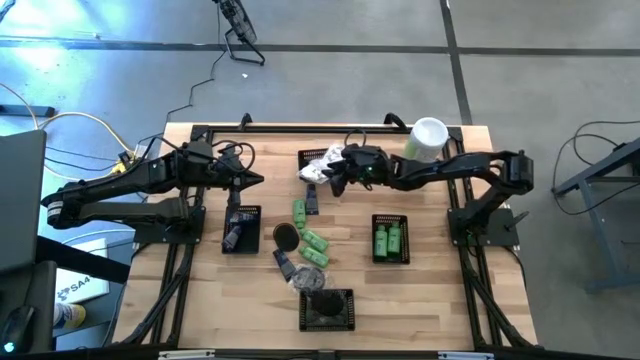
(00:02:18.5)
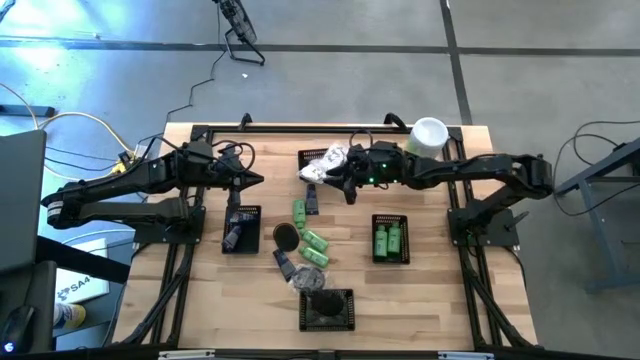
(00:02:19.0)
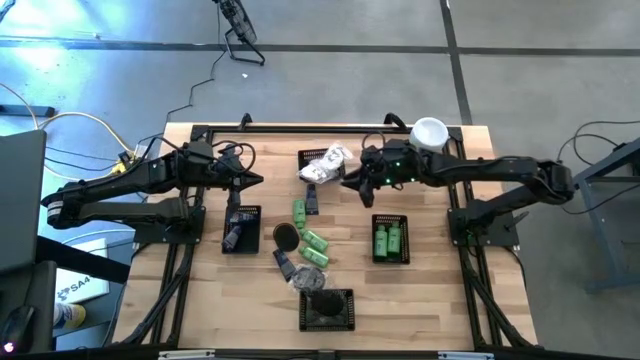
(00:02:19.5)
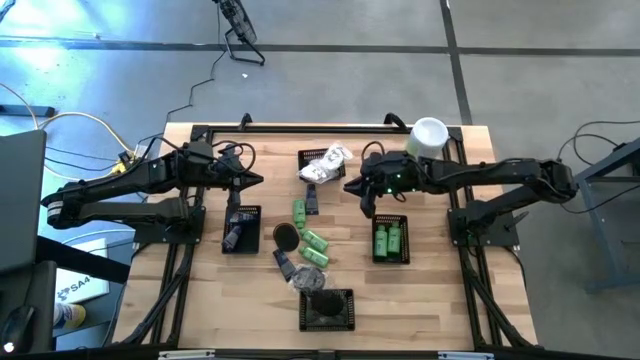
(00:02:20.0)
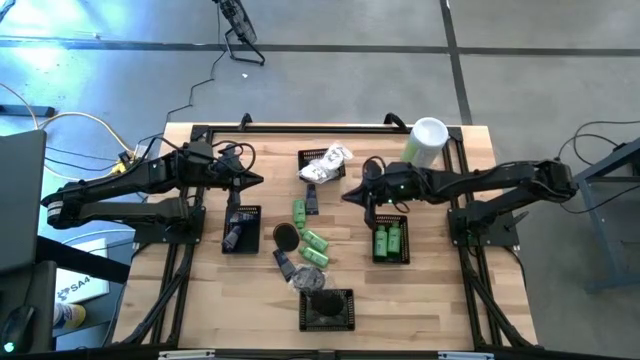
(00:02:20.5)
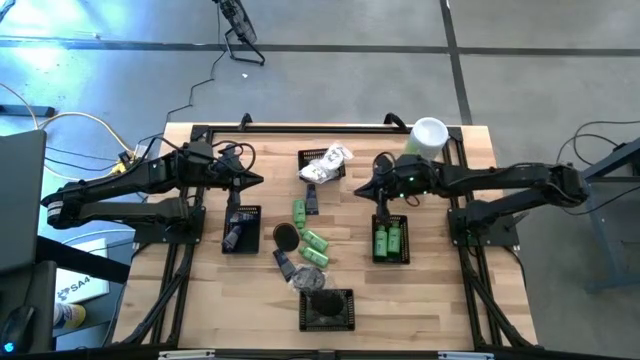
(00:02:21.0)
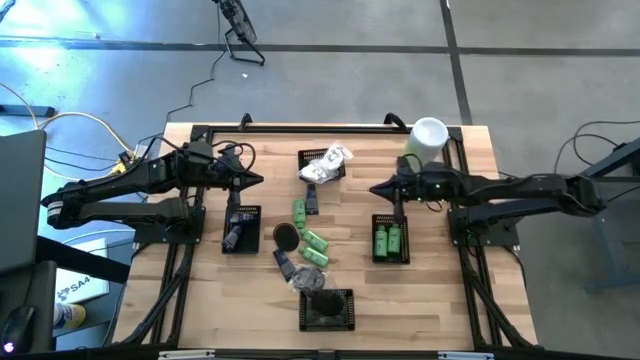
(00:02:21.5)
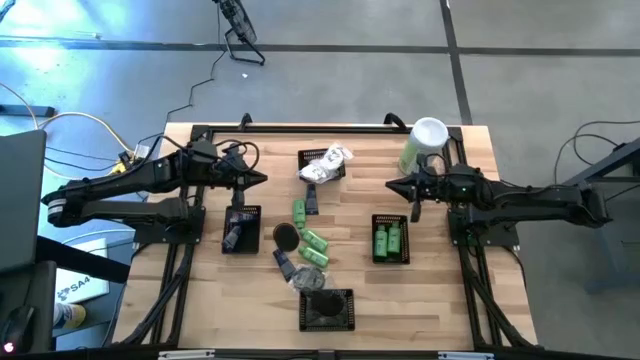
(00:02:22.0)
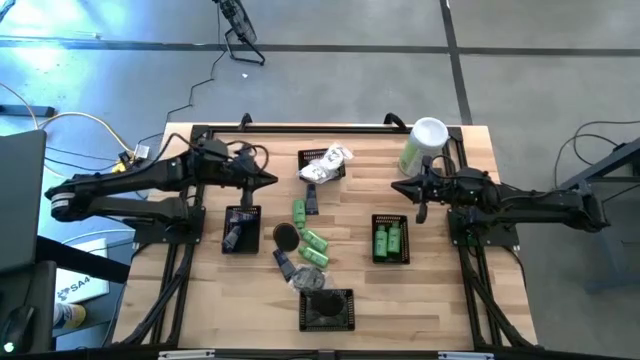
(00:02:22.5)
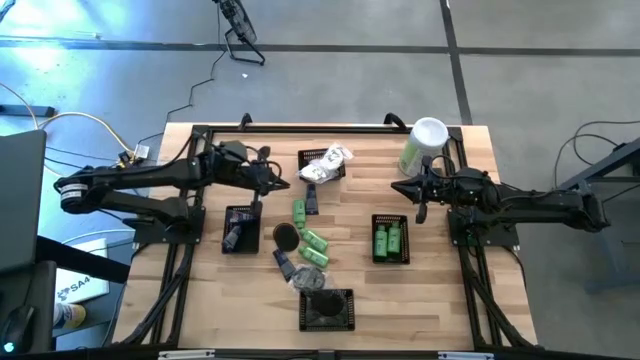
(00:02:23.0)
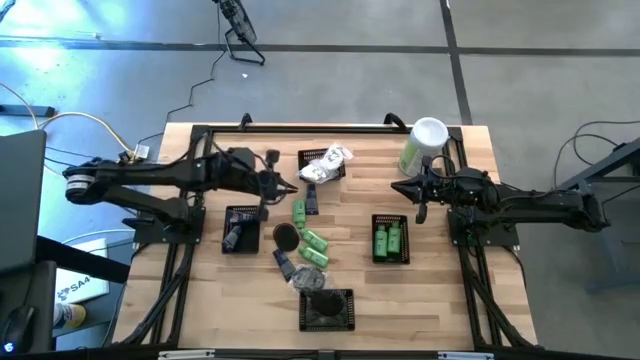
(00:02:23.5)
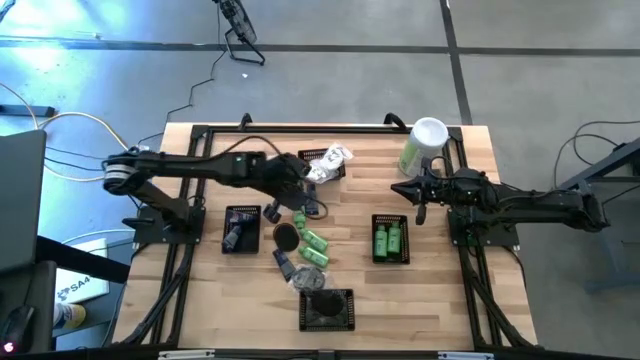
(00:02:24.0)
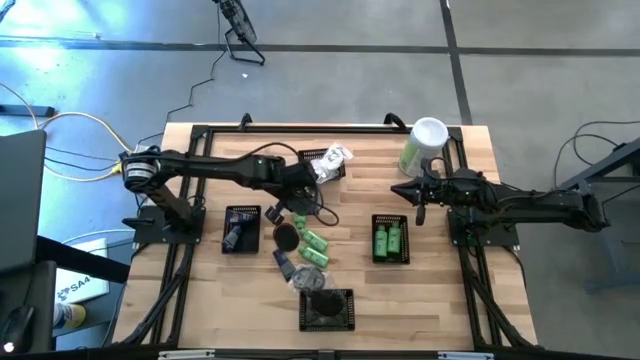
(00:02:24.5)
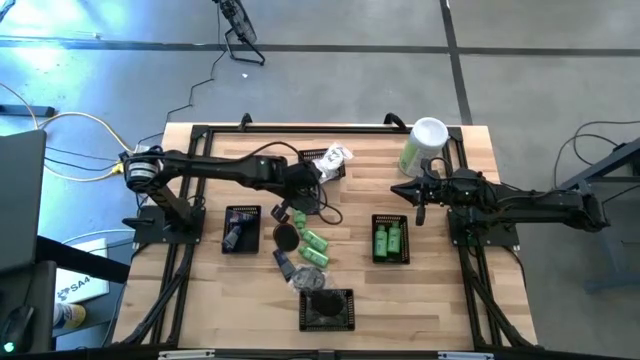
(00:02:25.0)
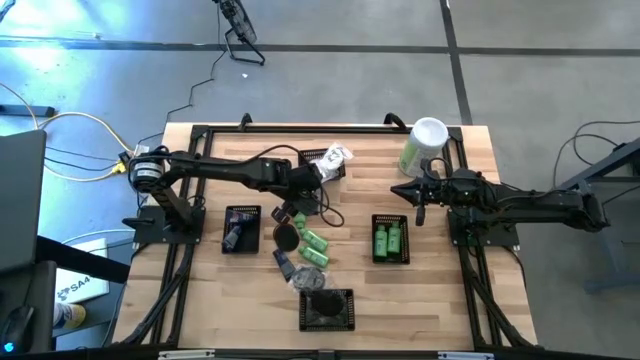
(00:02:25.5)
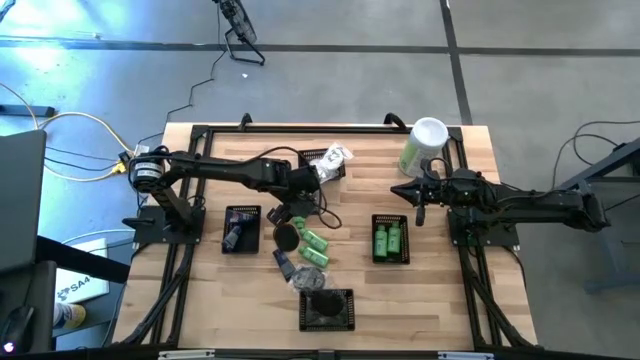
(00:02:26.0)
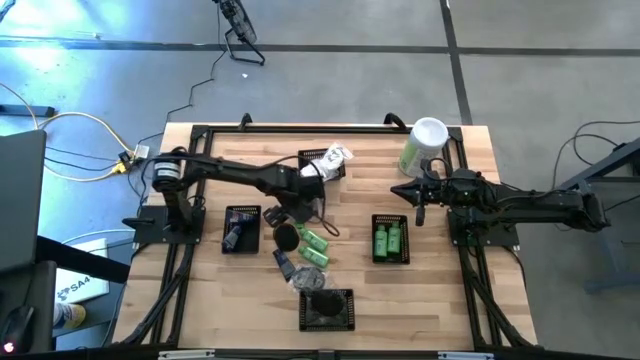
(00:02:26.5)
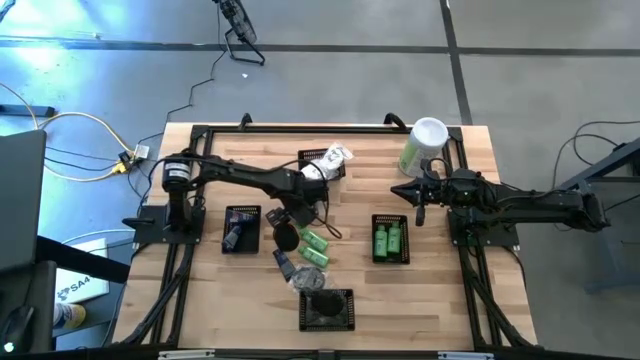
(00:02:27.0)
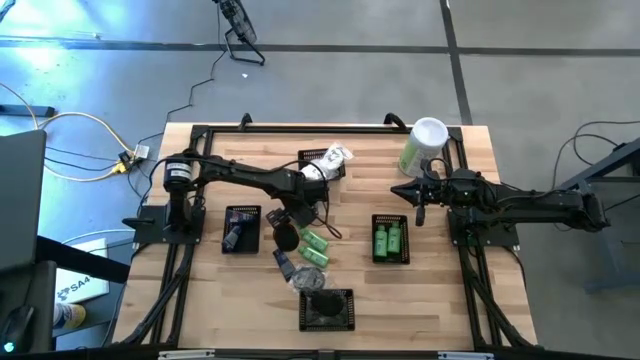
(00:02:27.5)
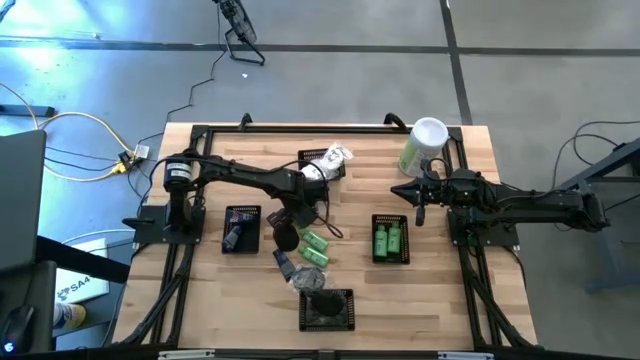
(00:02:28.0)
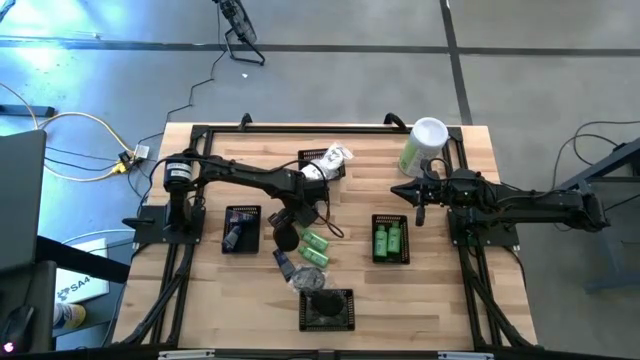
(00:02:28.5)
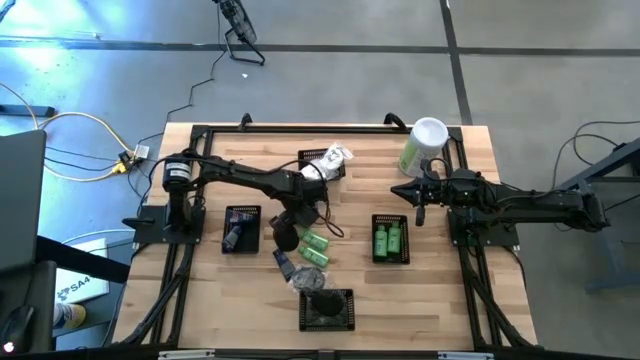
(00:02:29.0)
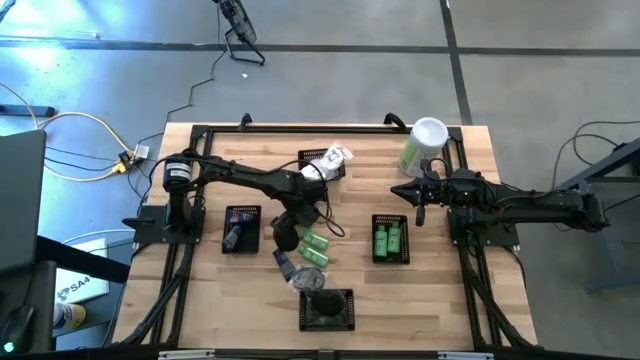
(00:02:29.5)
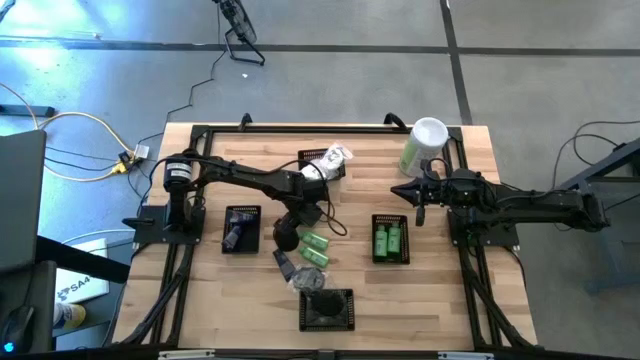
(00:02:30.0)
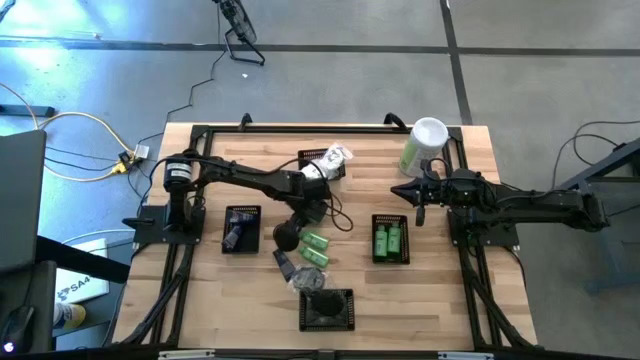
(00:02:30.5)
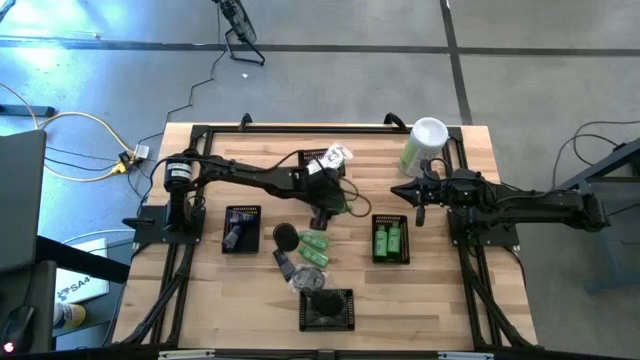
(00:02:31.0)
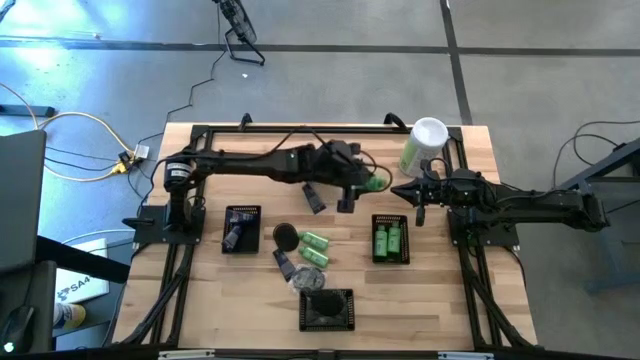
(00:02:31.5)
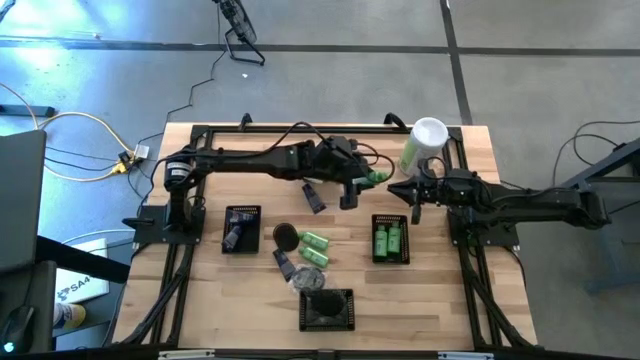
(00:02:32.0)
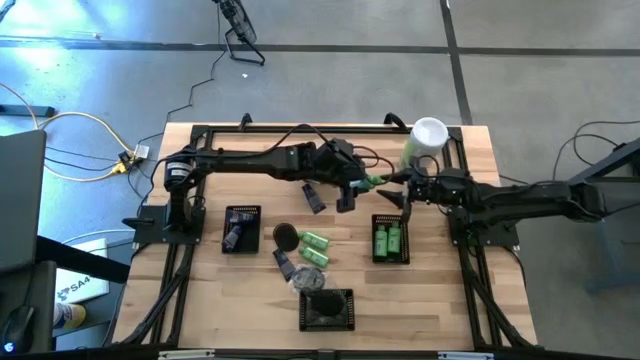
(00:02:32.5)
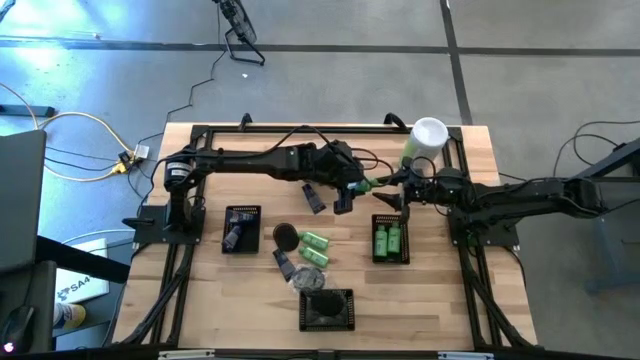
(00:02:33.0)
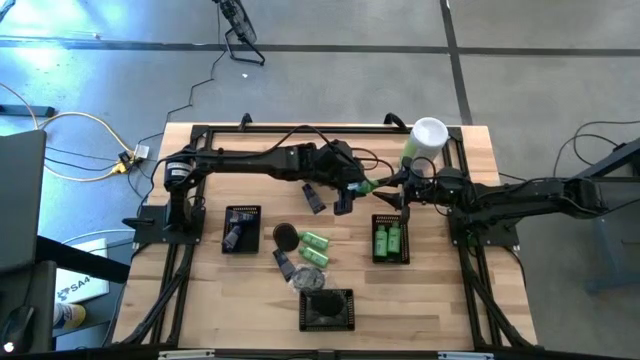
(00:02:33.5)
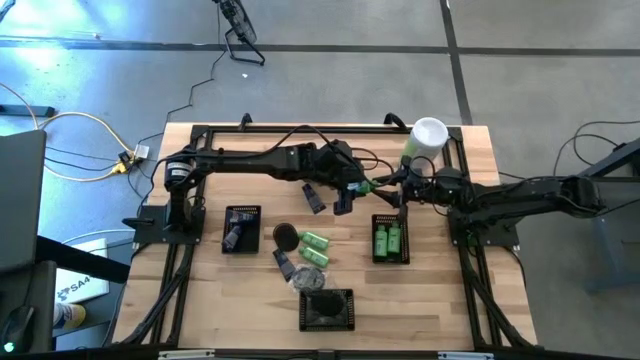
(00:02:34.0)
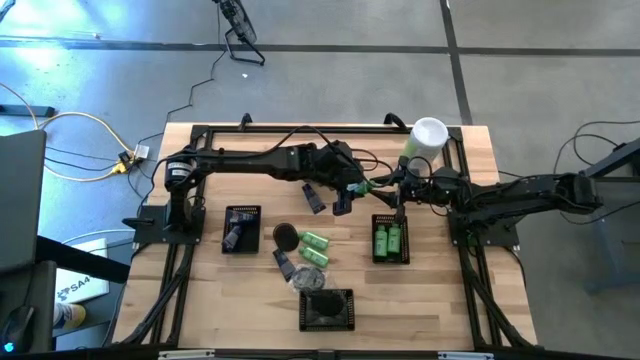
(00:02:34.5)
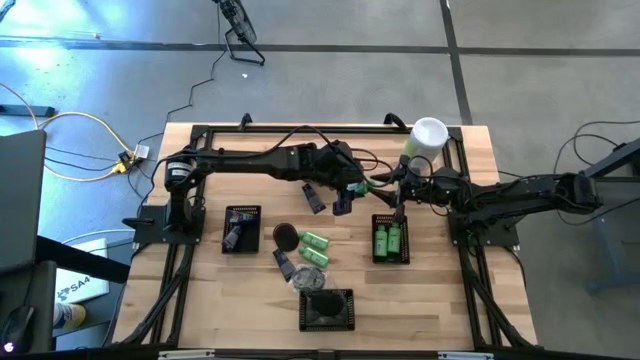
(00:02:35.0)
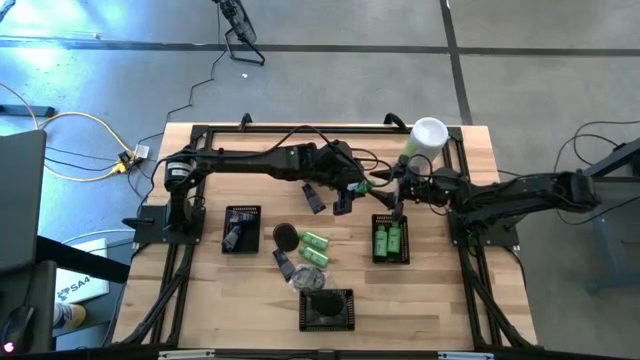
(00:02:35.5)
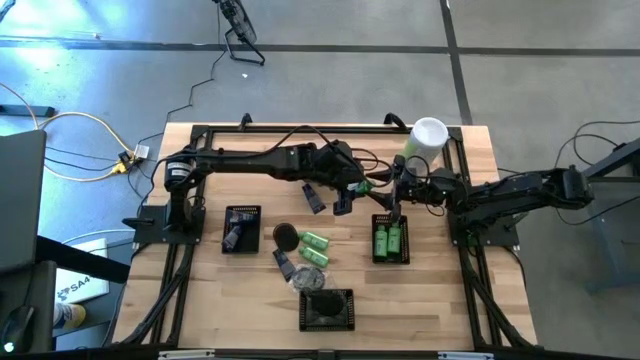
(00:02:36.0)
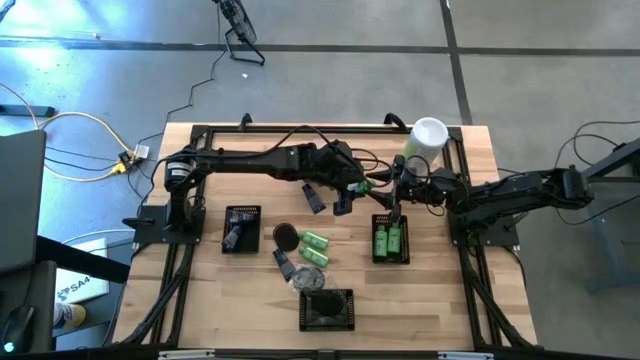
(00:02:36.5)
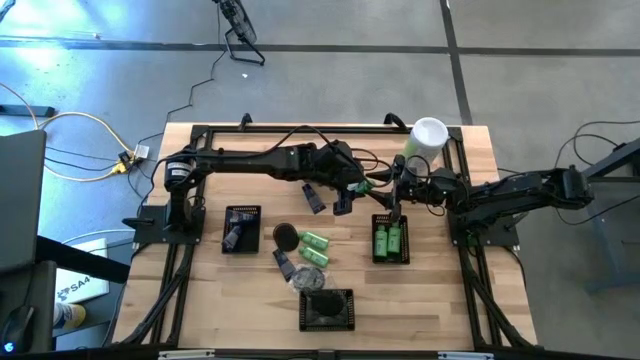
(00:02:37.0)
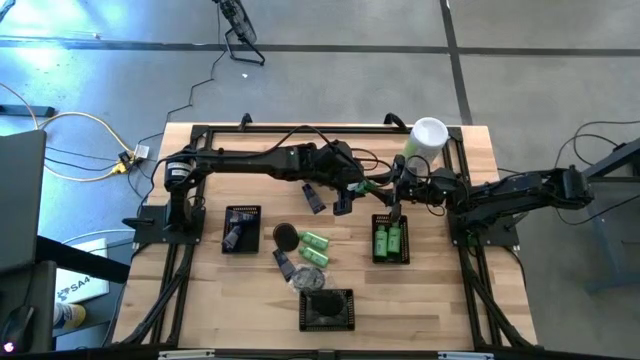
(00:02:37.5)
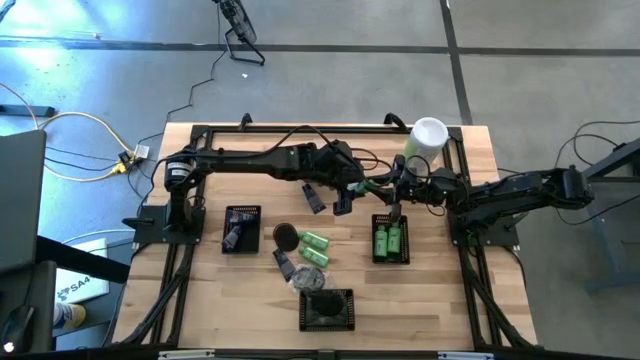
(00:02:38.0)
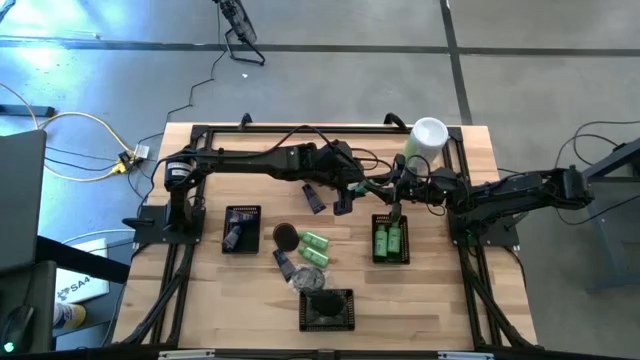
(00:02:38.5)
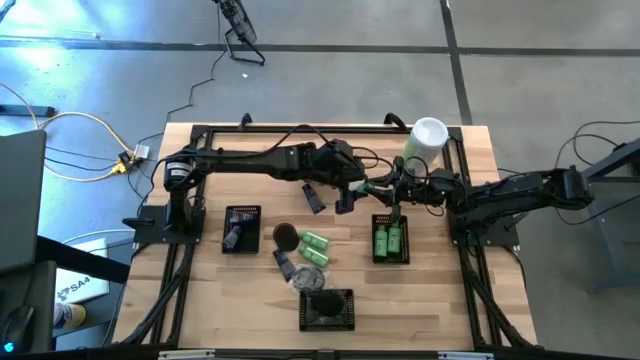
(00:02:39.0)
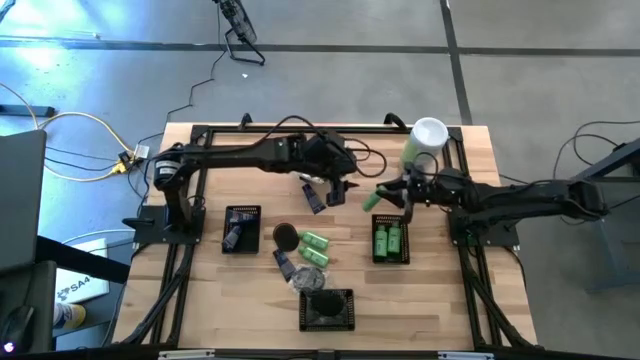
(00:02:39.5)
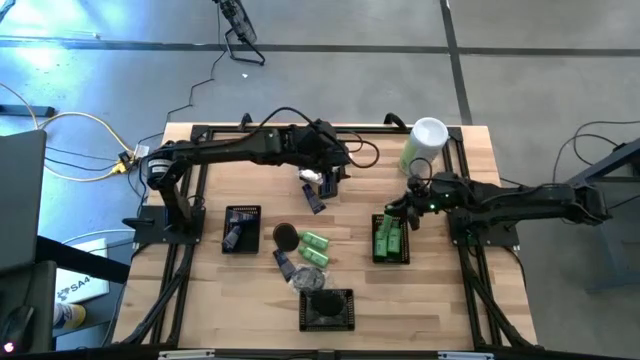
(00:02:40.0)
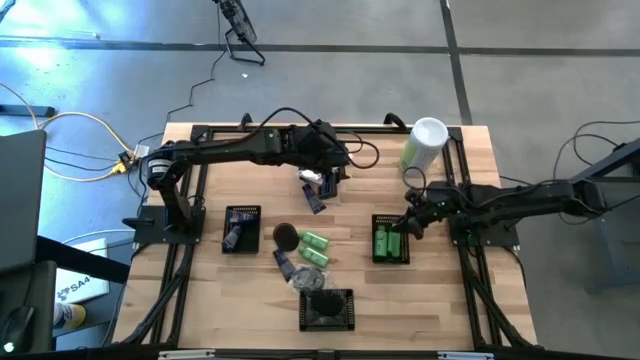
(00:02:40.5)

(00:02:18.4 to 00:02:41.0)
Task: Pick & Place Travel size toiletries
Put the green bottle into the middle right black bin
